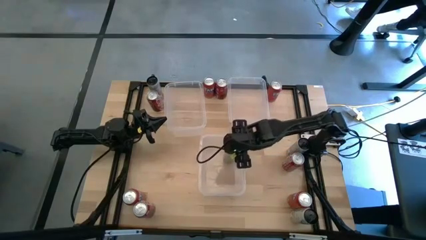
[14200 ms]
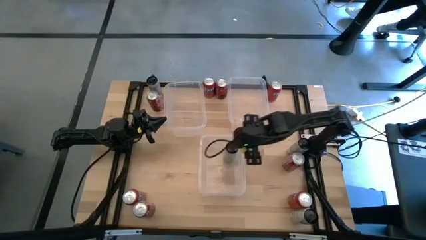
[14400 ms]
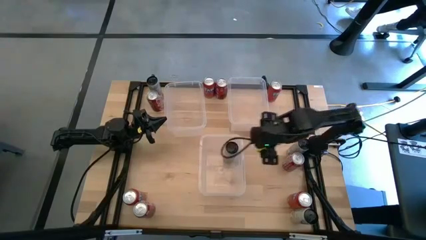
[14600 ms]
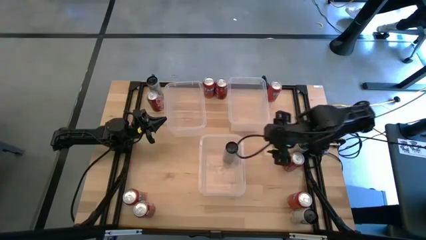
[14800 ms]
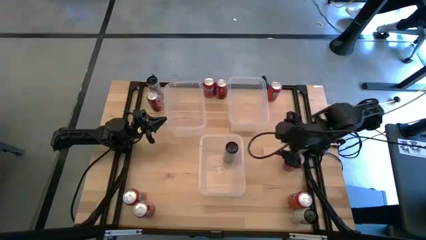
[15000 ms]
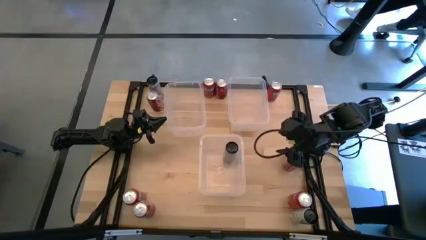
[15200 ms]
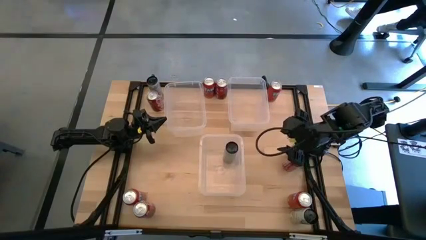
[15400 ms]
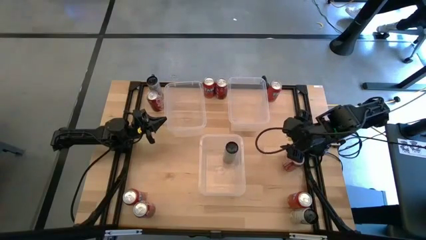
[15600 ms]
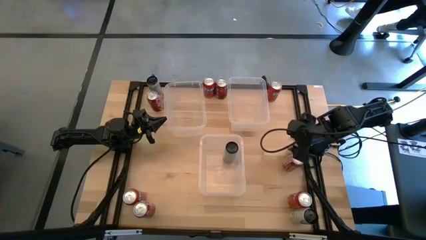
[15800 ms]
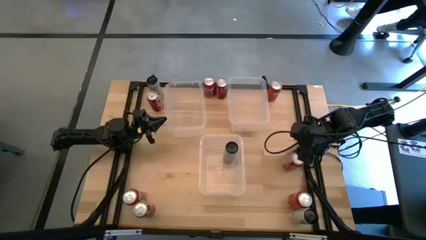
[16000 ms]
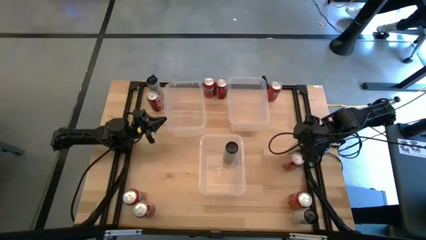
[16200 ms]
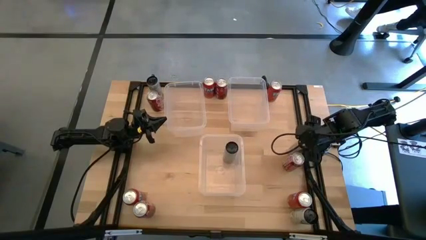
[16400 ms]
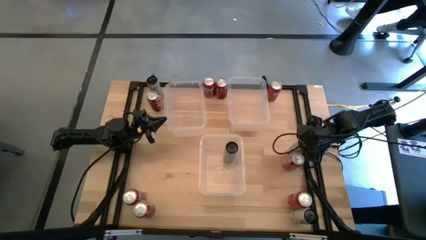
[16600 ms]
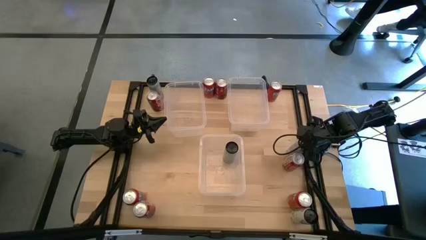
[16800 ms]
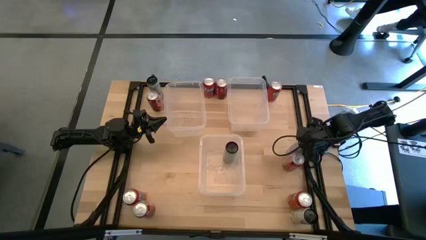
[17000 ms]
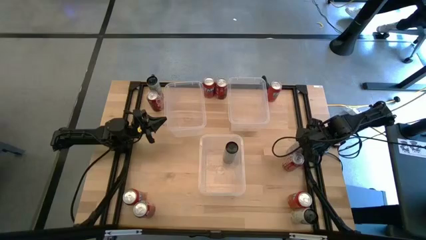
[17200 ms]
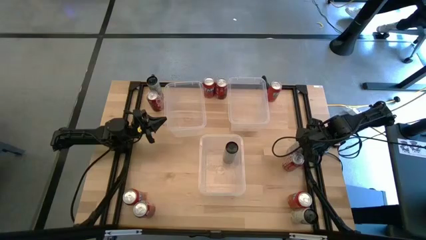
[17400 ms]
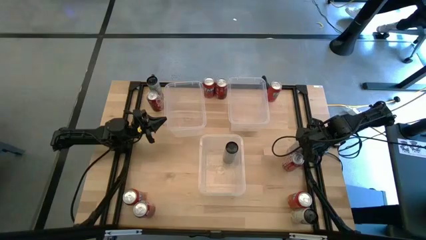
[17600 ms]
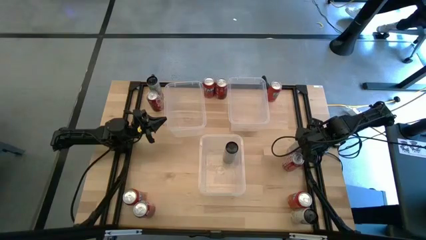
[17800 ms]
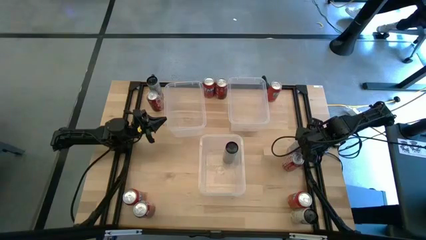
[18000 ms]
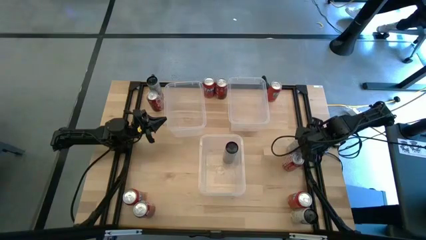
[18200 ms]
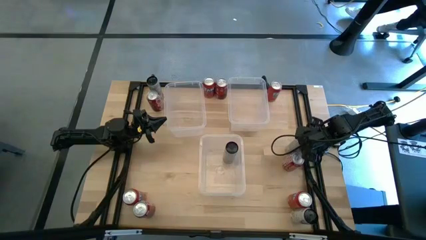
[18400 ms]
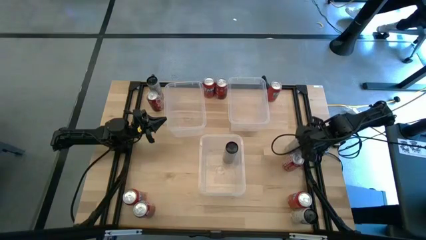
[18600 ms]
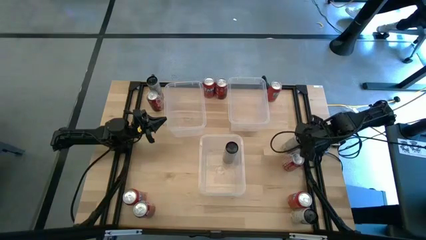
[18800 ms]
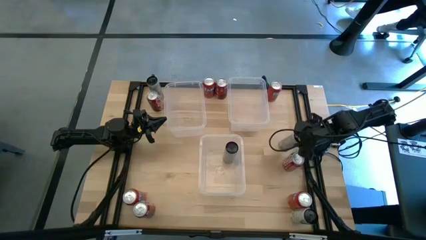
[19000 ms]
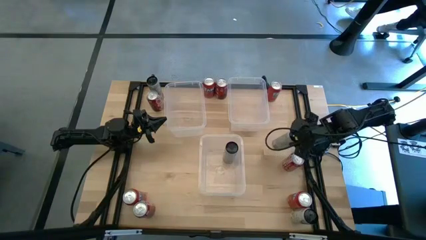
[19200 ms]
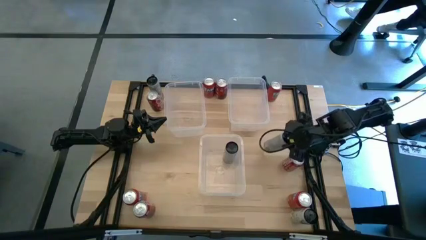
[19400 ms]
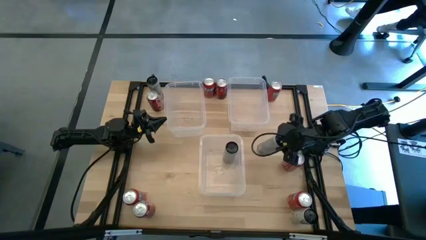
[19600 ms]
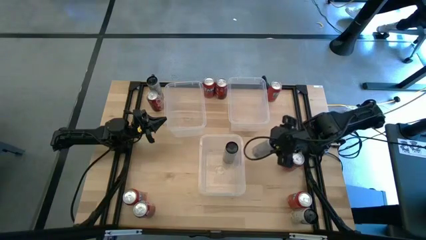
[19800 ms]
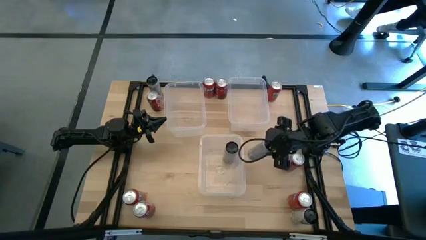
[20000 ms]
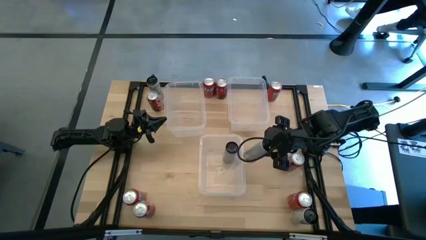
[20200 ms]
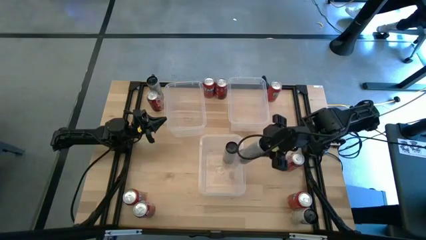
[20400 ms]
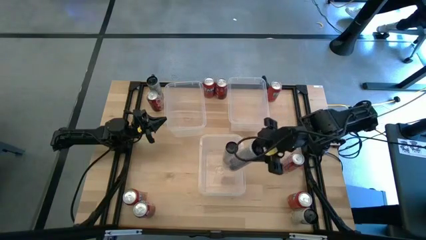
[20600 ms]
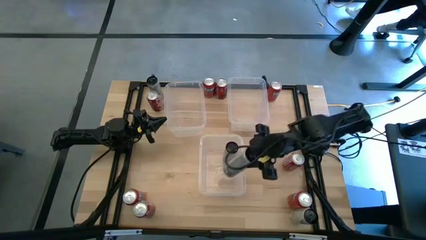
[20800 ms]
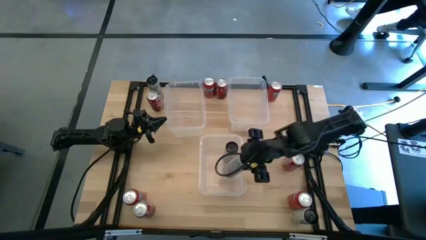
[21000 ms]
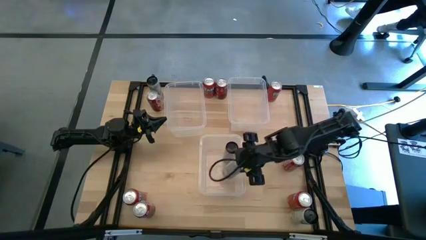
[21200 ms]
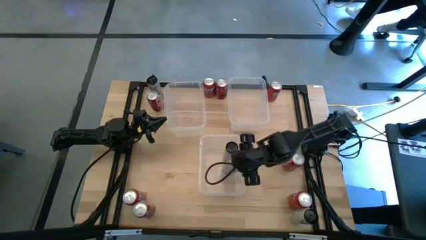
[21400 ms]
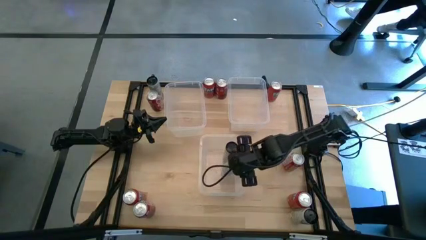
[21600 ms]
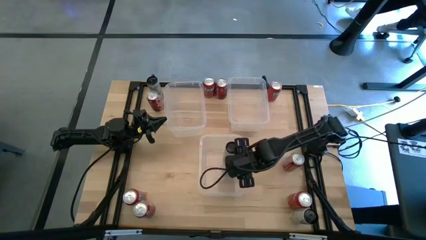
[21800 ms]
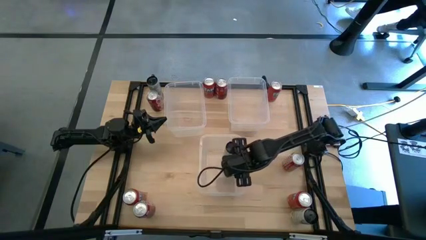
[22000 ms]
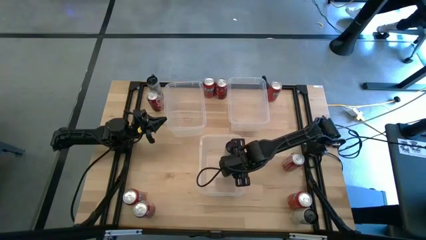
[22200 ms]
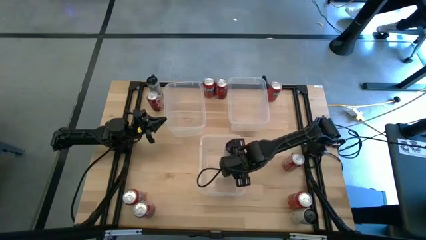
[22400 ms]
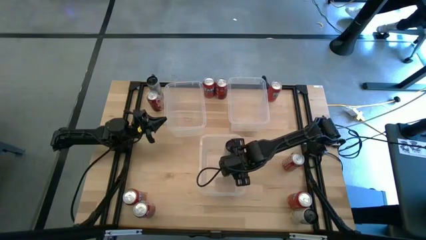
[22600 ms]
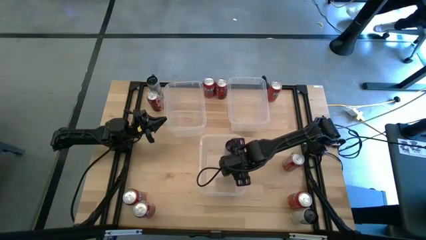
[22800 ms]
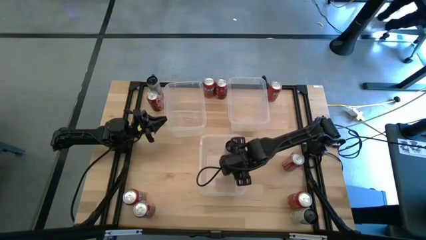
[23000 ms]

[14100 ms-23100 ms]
Task: Sort soda cans
Put the white/yellow soda can into the bottom transparent bin

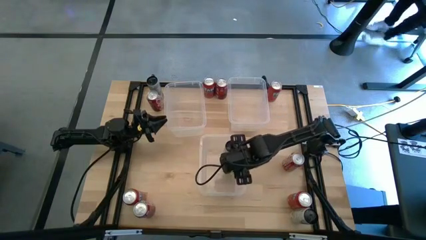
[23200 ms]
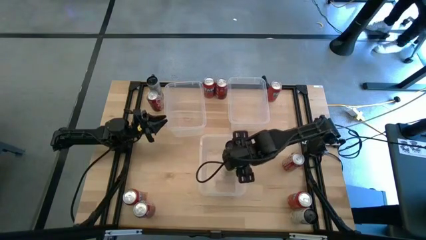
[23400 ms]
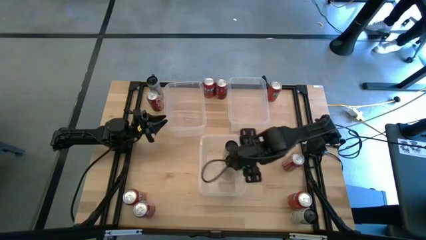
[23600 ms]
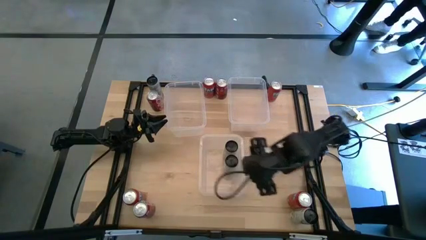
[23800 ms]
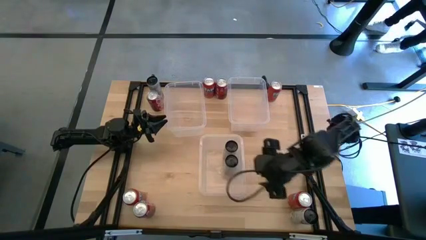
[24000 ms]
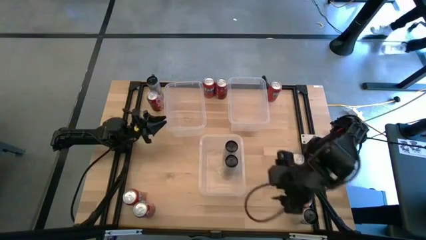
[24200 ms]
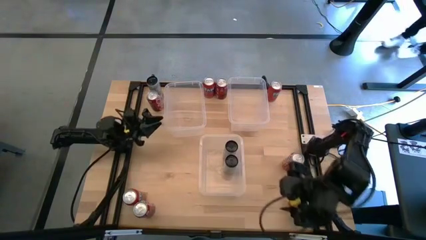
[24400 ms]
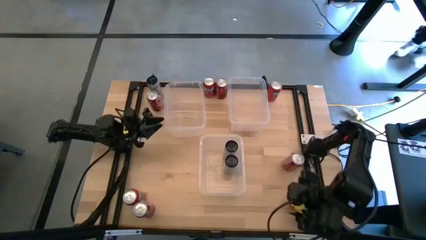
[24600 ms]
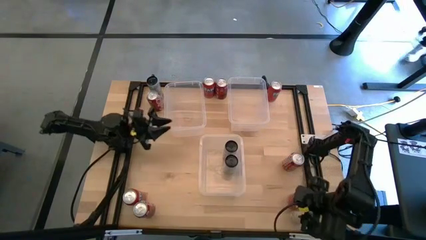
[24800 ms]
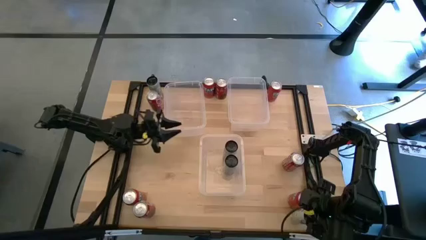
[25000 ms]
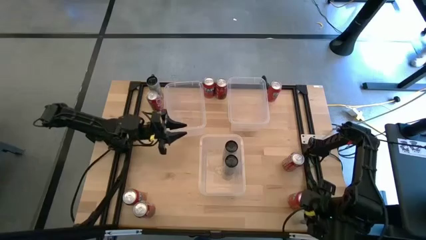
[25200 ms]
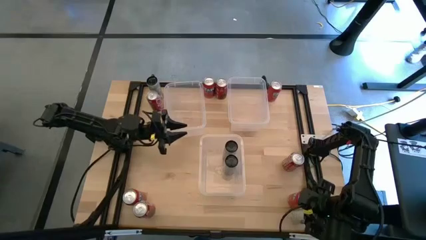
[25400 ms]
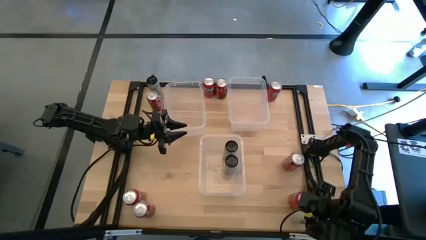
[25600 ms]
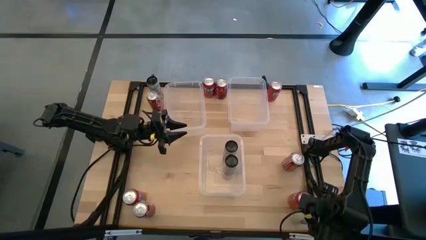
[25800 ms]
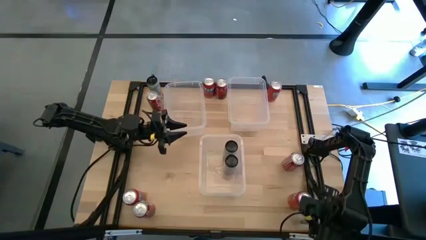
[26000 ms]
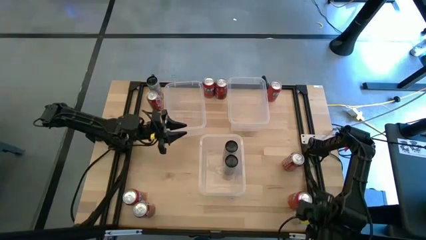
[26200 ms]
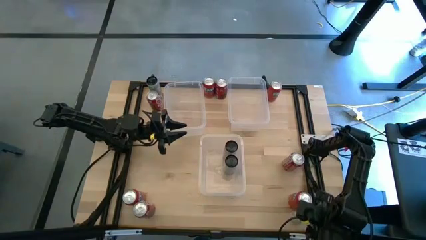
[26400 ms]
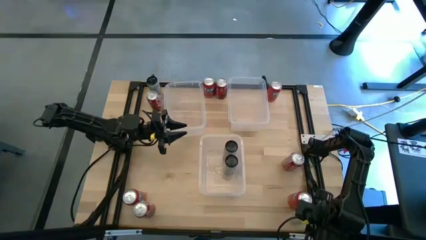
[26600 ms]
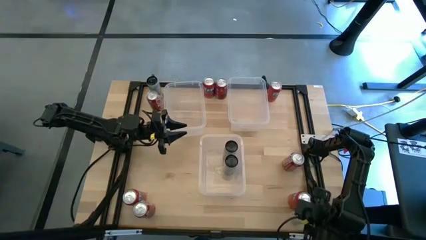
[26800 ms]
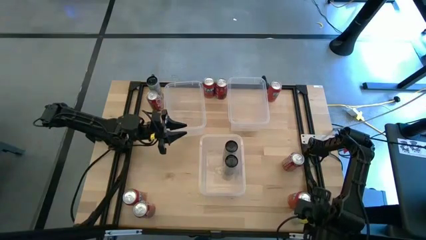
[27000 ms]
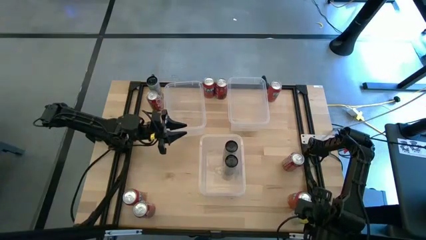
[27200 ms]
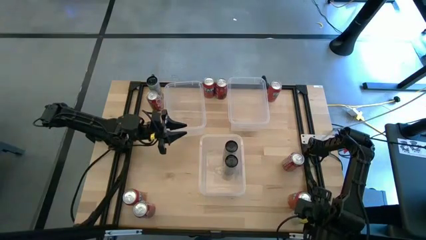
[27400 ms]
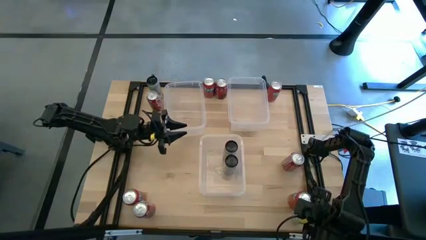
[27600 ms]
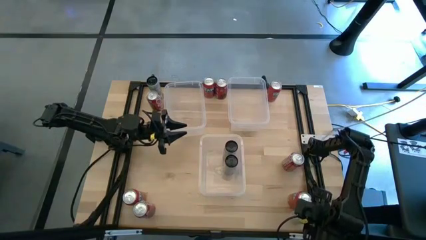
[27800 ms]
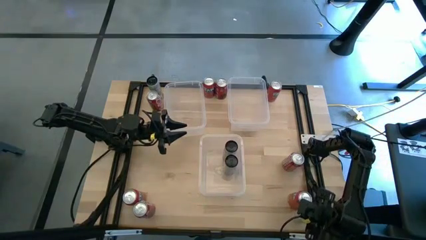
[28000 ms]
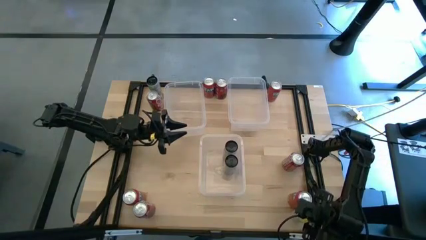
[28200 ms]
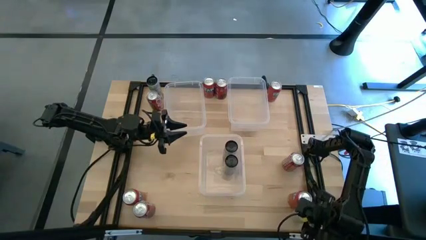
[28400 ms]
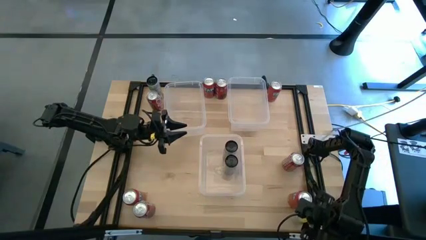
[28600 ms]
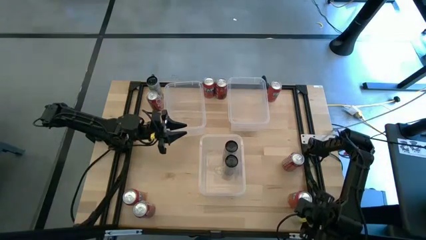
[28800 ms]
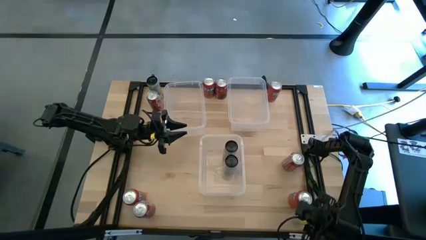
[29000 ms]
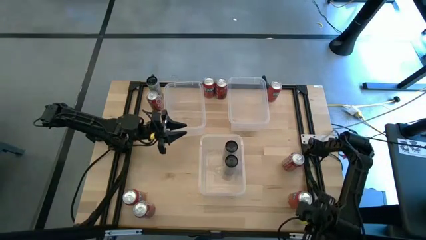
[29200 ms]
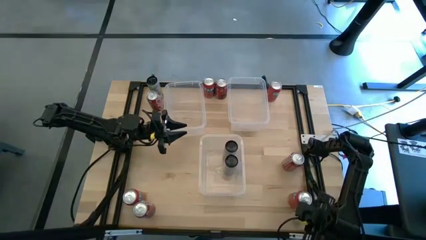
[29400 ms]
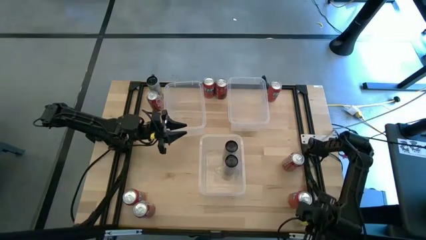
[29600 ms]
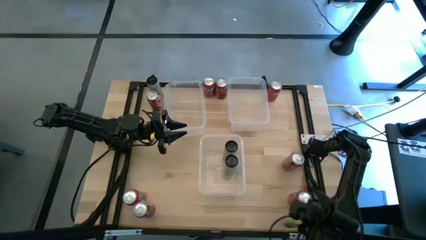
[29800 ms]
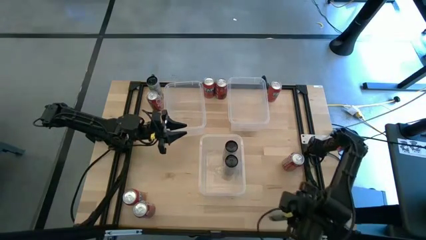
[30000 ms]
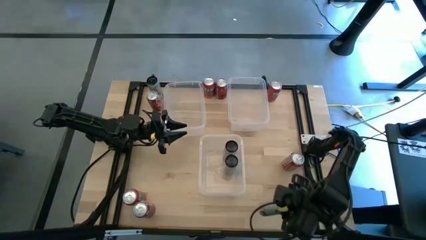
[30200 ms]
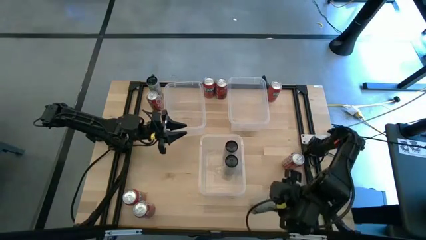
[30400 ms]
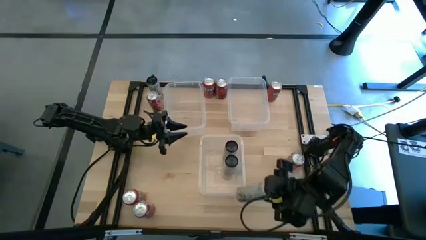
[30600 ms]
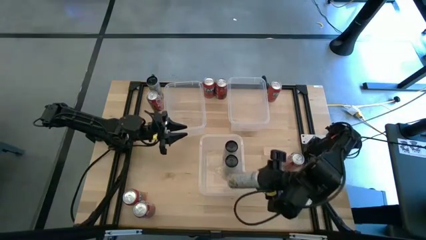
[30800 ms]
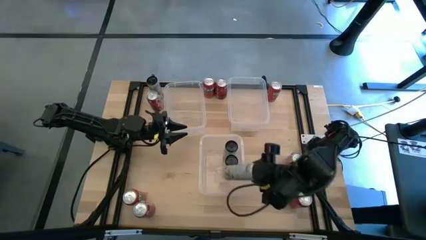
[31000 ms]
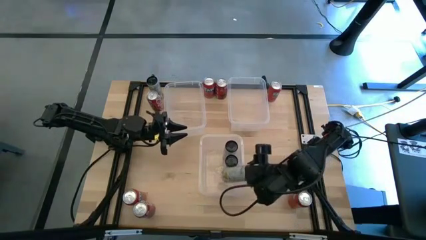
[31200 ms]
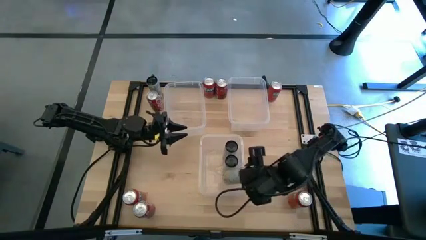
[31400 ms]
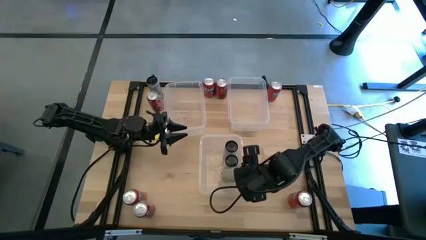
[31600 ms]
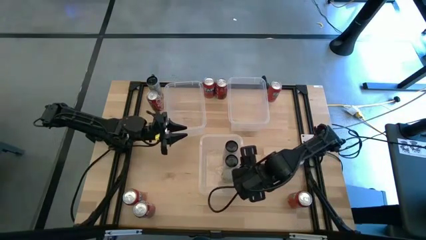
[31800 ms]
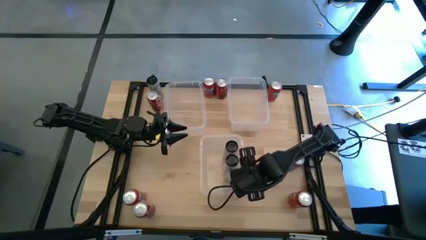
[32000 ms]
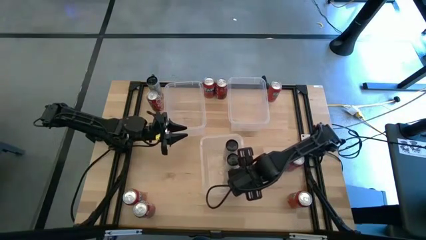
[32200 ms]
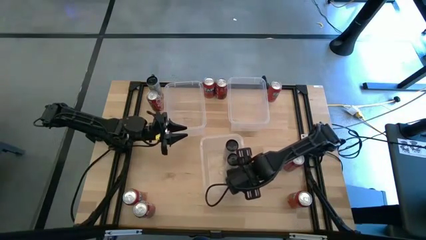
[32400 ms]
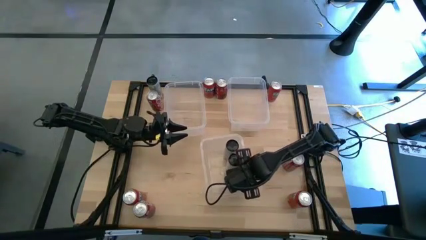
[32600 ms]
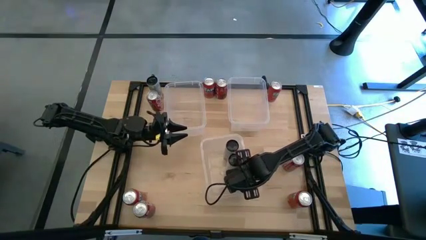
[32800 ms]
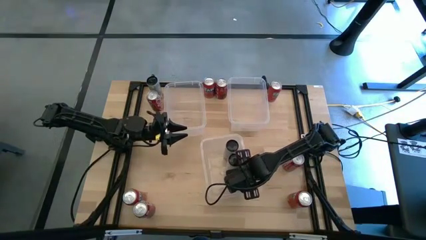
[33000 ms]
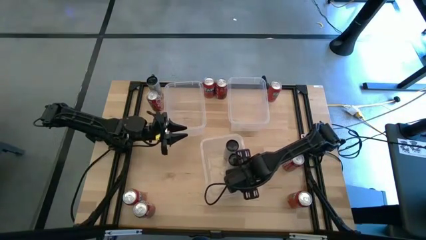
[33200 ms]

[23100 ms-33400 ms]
Put the white/yellow soda can into the bottom transparent bin
